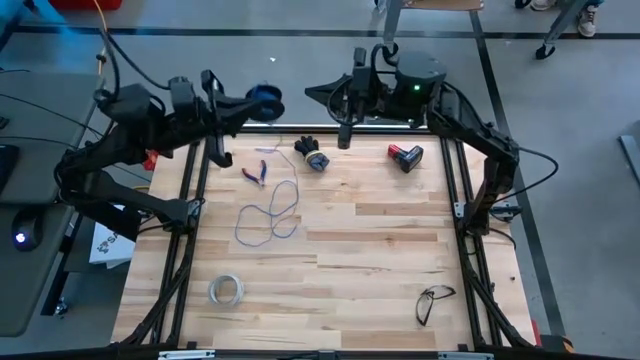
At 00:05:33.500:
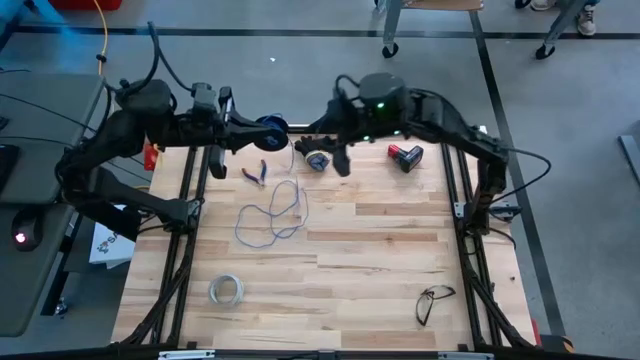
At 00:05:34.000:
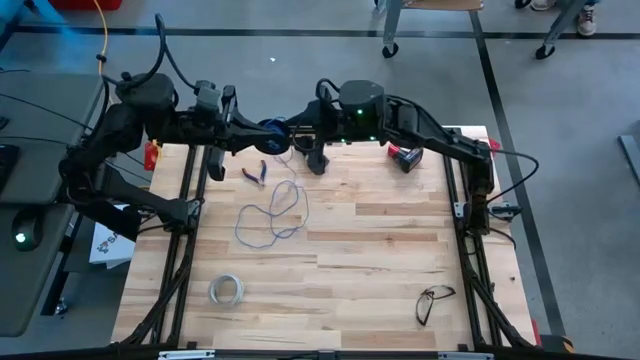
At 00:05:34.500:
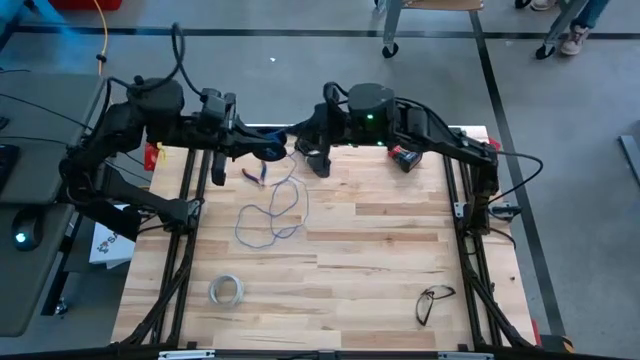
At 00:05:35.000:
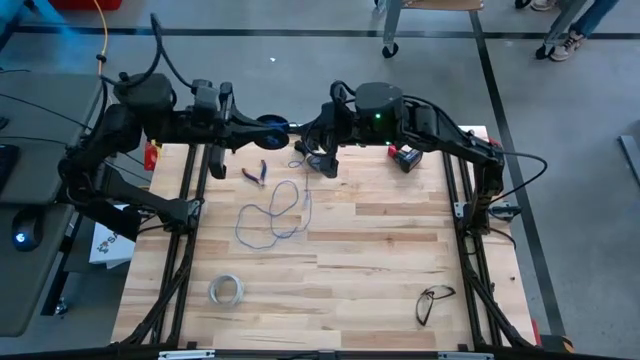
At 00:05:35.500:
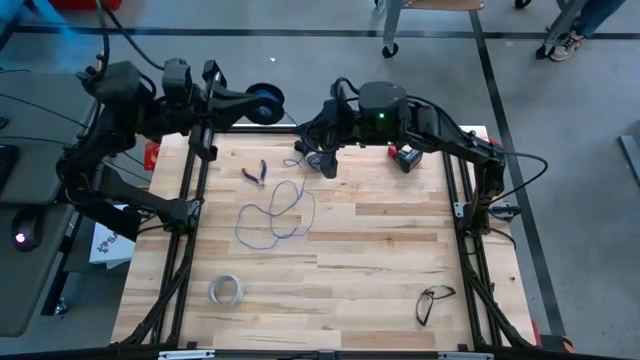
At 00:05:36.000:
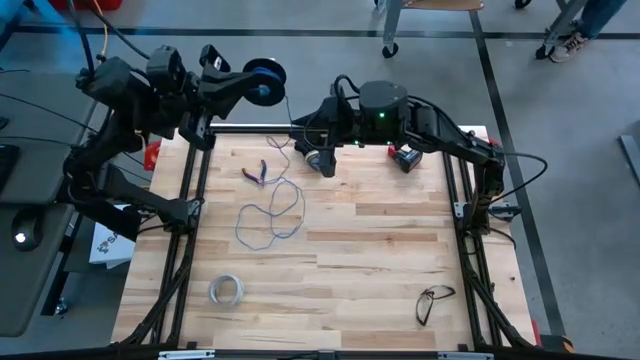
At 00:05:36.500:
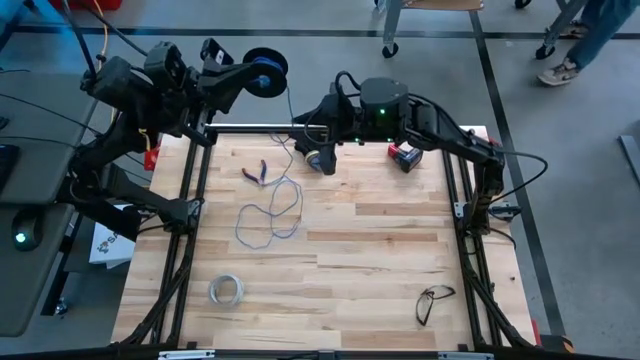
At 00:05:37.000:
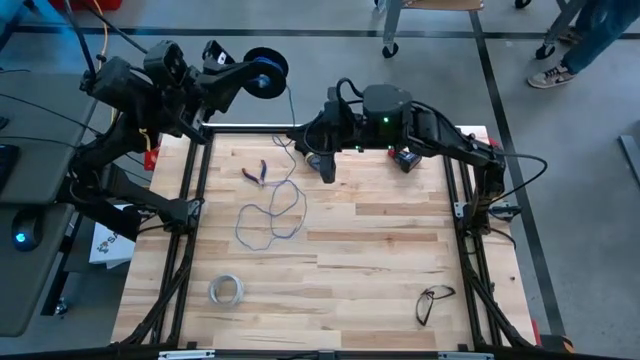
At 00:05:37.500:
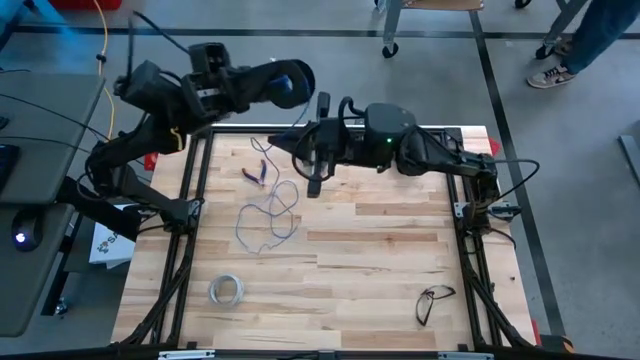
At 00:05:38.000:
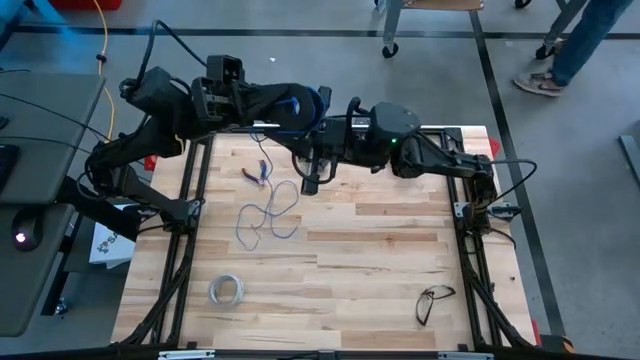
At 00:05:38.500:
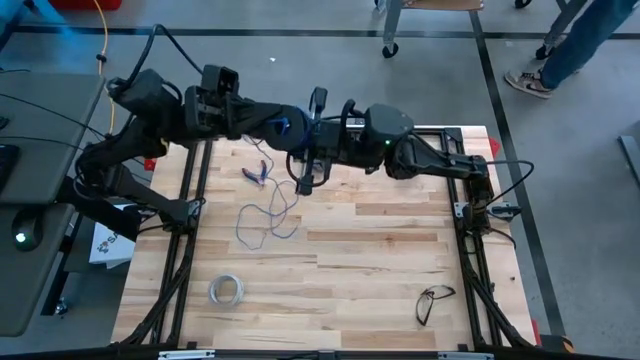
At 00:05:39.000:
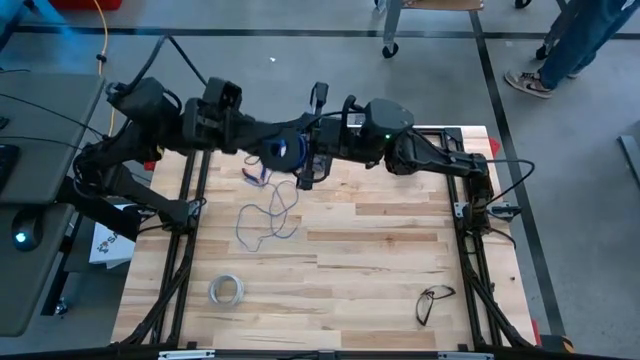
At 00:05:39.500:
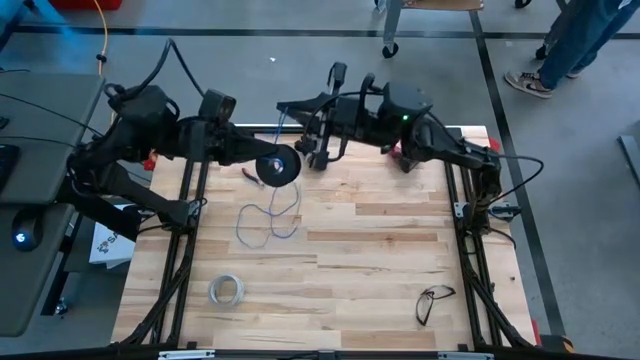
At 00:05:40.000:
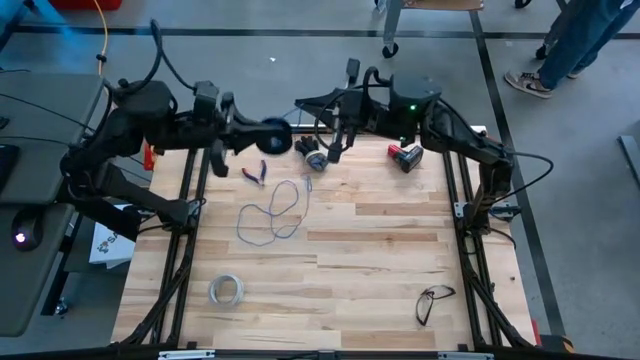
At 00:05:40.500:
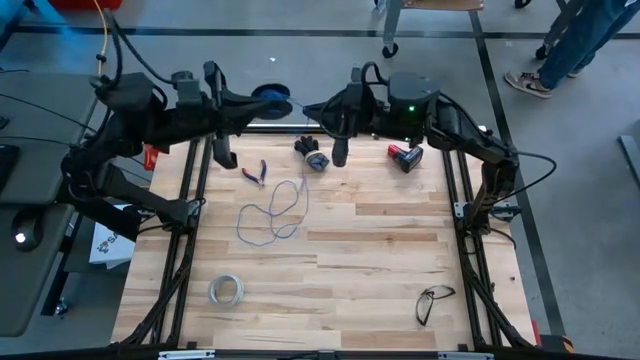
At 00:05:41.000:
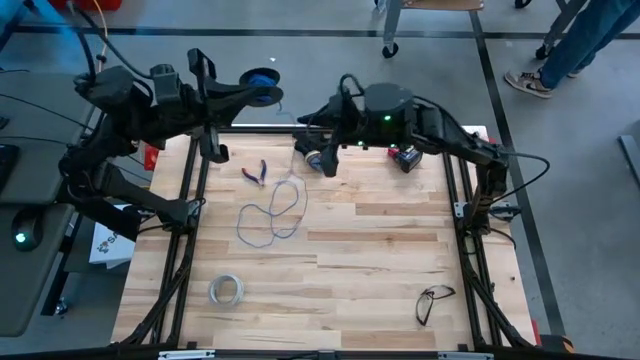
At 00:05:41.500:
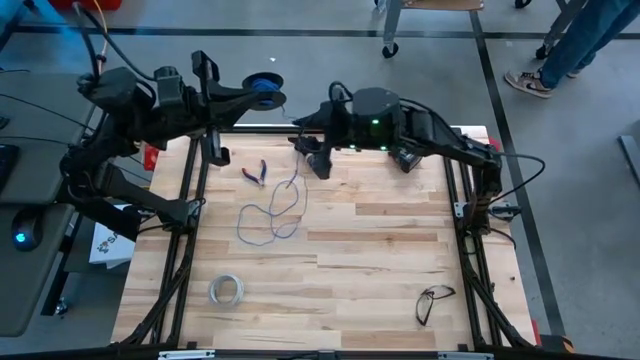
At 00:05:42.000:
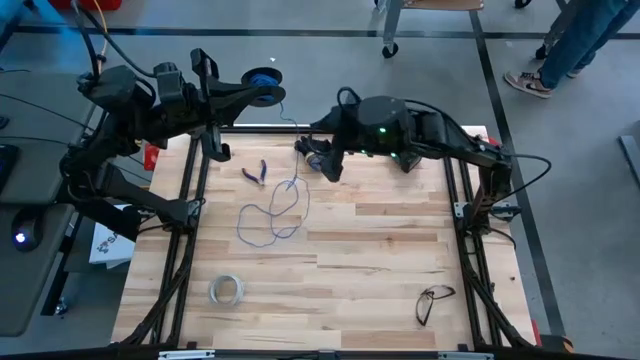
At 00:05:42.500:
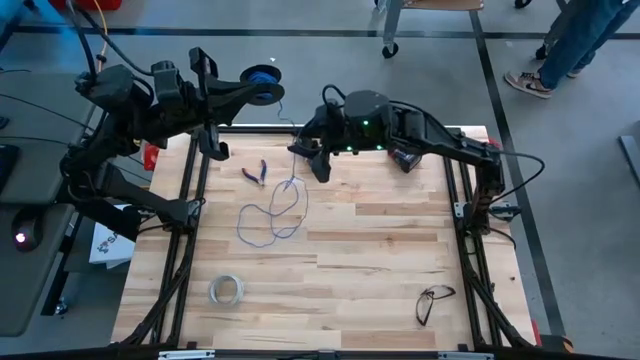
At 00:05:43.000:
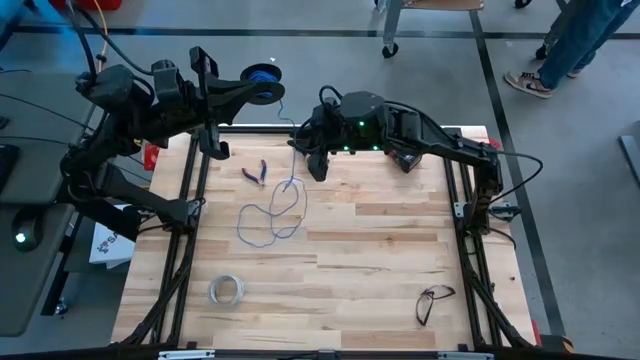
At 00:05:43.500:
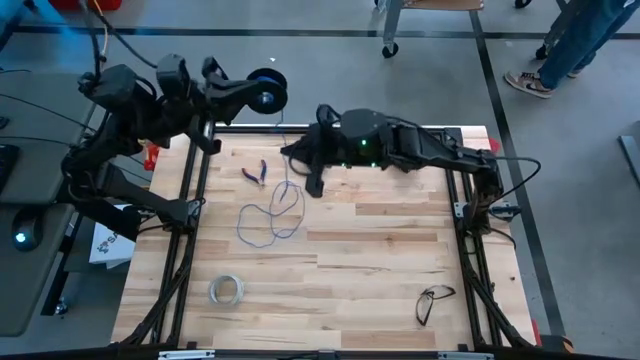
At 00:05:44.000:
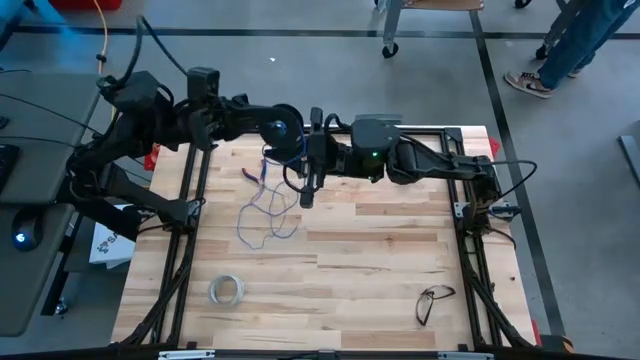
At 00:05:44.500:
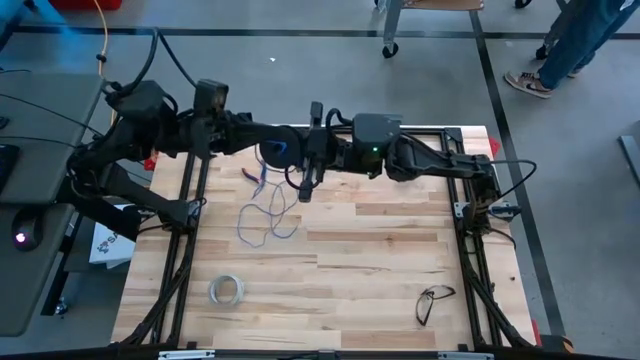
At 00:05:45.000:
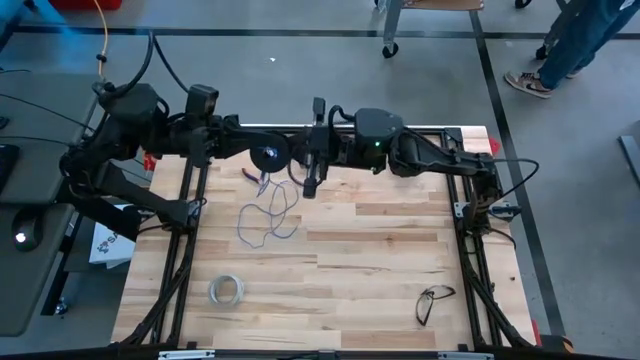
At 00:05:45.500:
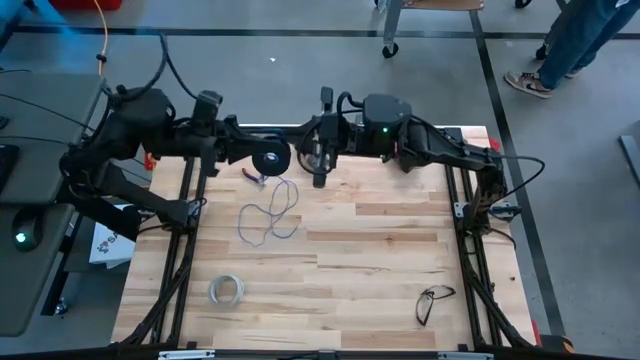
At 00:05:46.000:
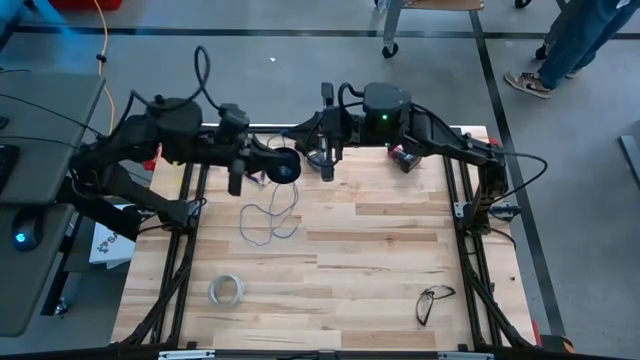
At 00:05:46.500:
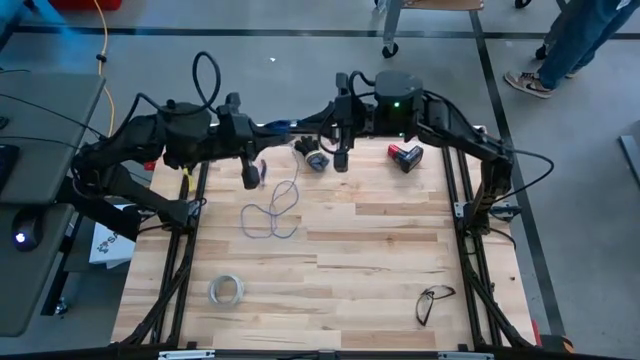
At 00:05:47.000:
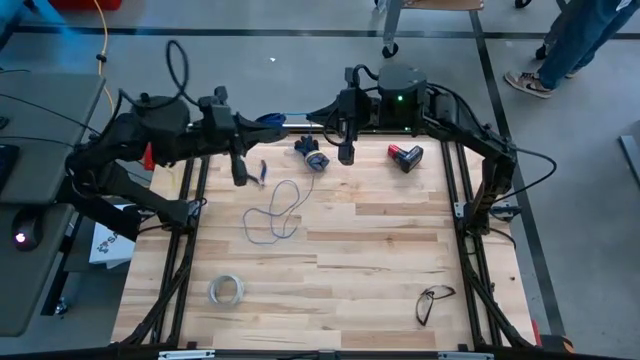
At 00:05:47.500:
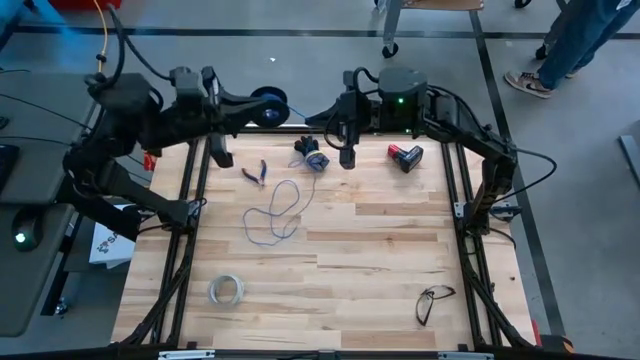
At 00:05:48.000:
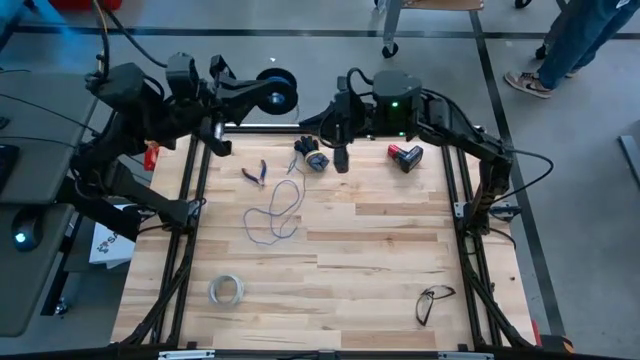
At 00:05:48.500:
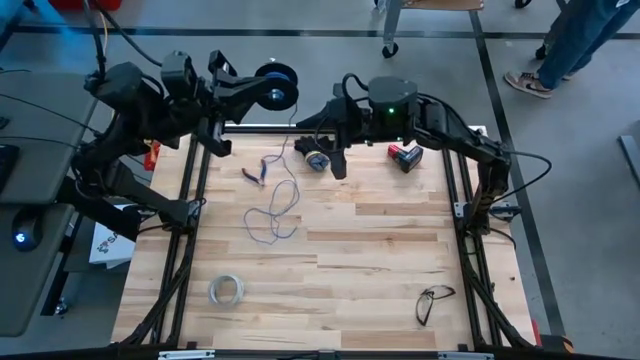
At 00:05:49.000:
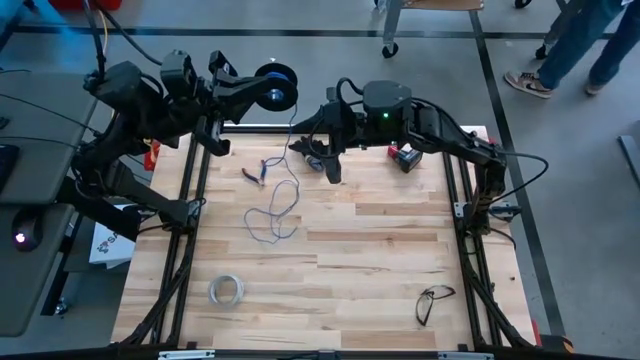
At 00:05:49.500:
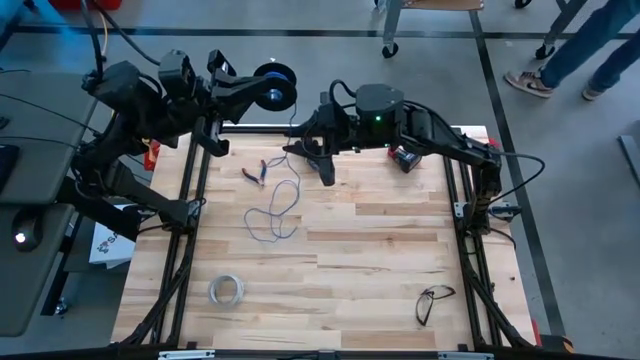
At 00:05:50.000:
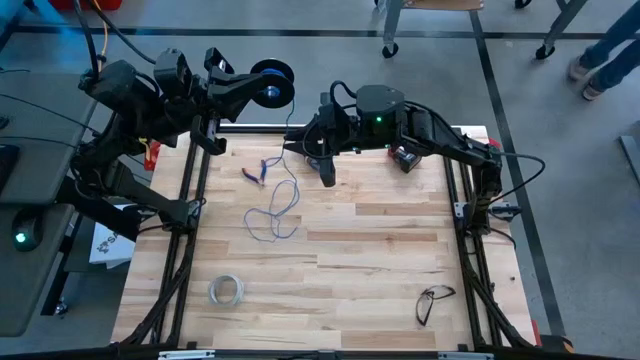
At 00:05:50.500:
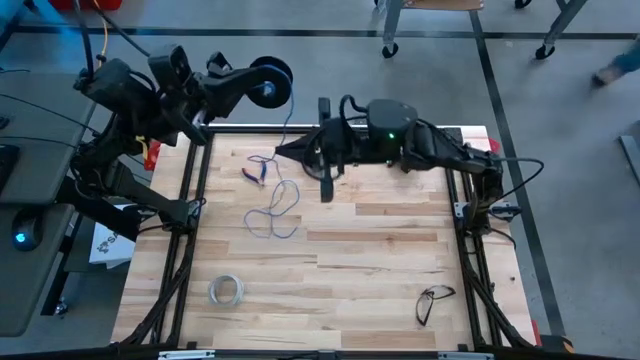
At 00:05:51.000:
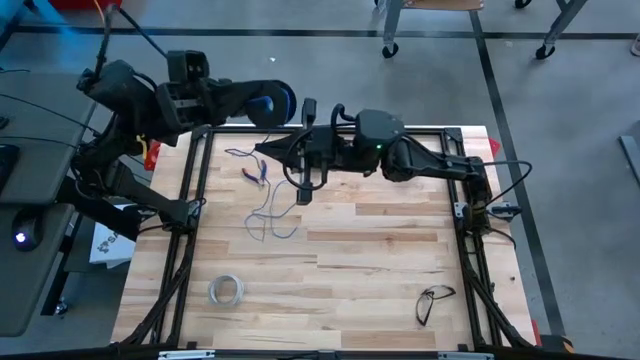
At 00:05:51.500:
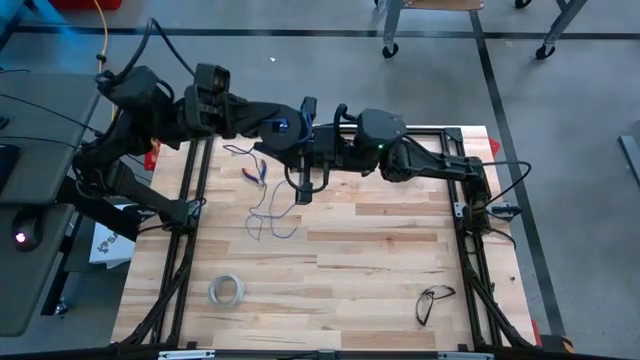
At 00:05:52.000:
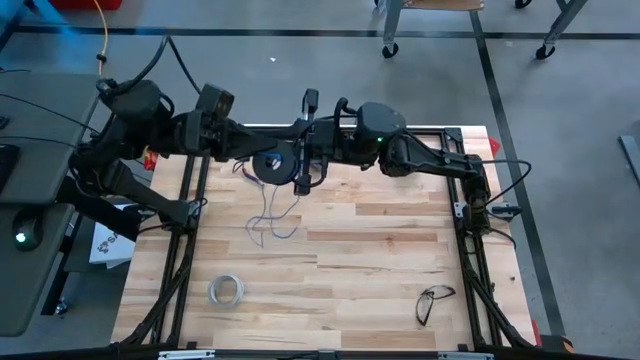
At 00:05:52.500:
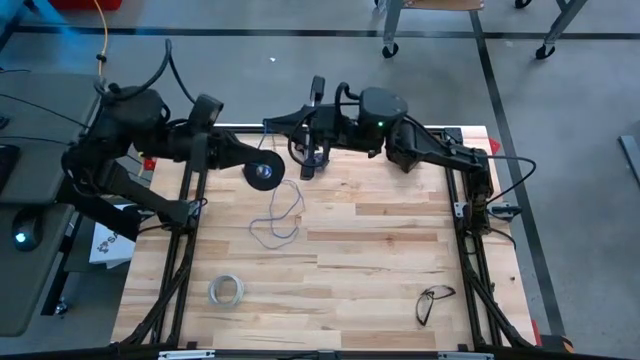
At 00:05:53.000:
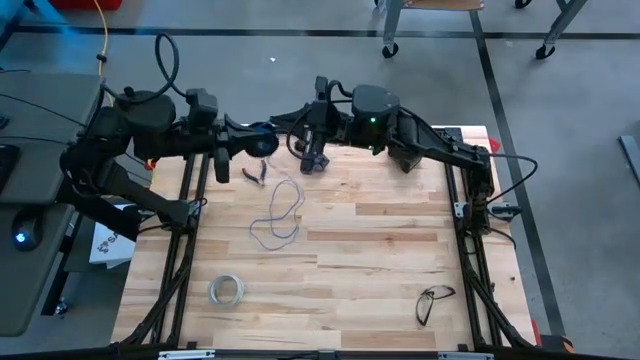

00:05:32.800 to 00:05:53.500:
Task: Coil cords
Coil the blue wire onto the black spool
